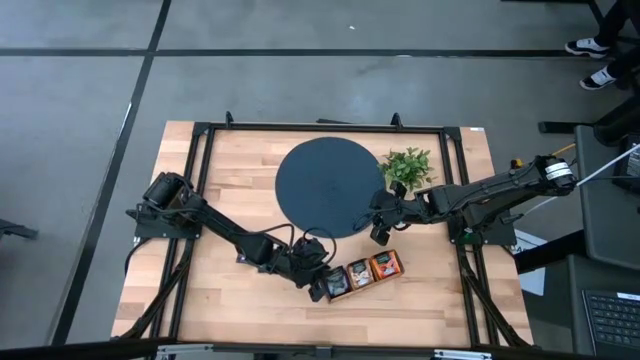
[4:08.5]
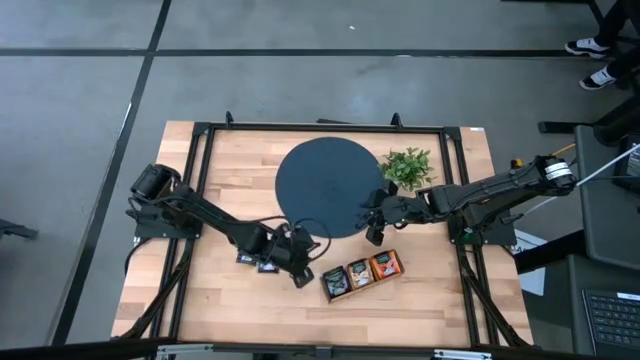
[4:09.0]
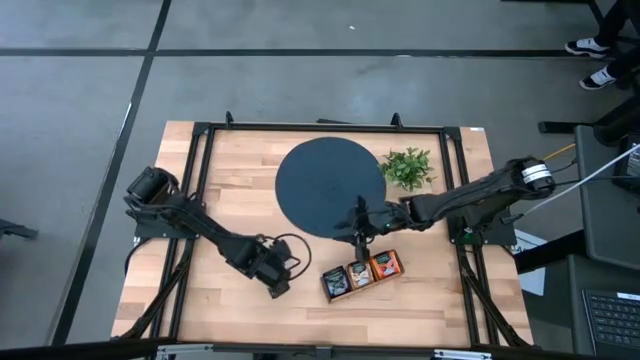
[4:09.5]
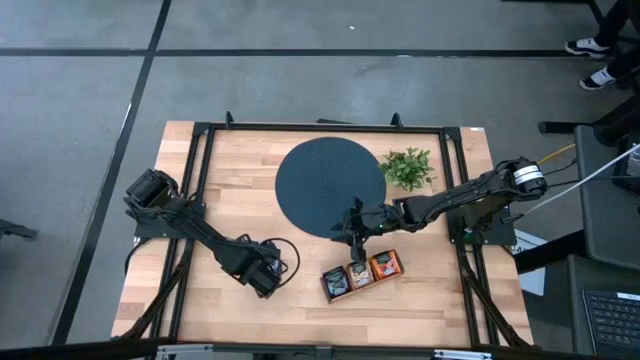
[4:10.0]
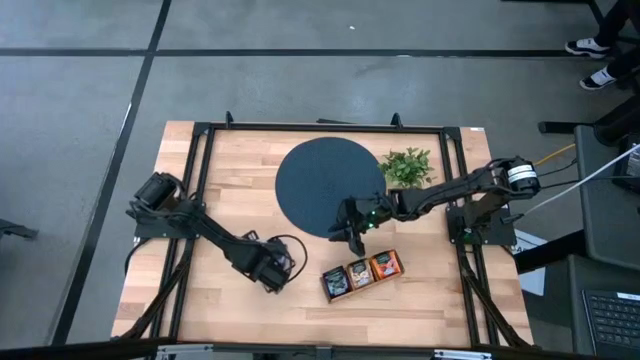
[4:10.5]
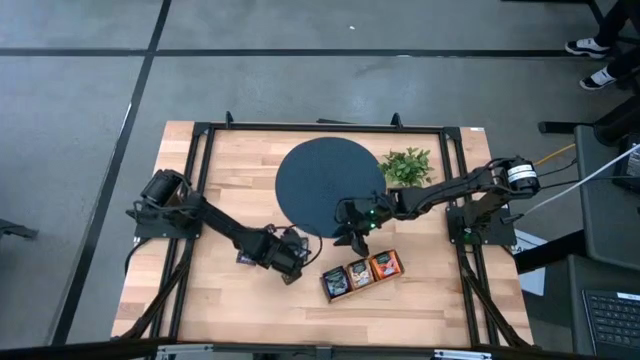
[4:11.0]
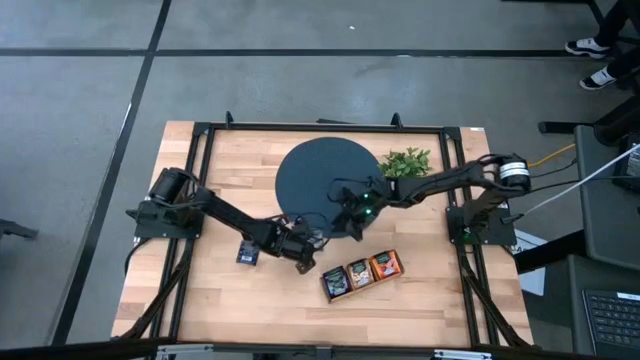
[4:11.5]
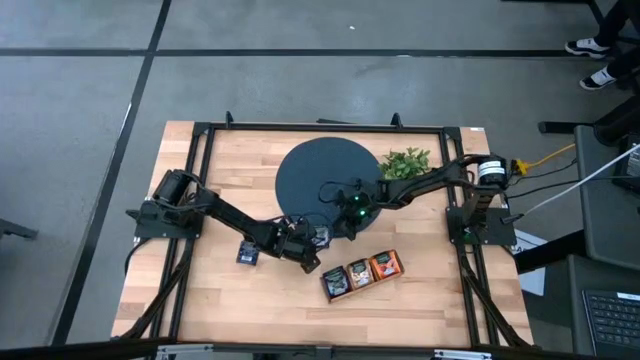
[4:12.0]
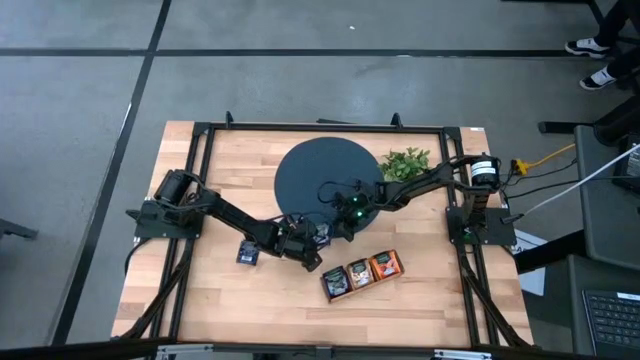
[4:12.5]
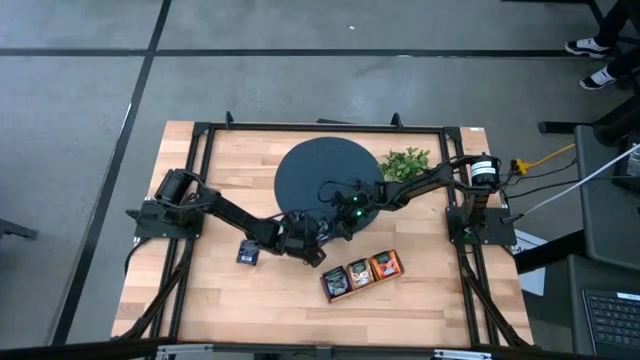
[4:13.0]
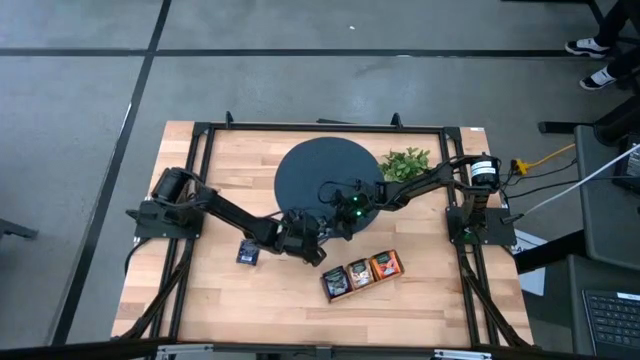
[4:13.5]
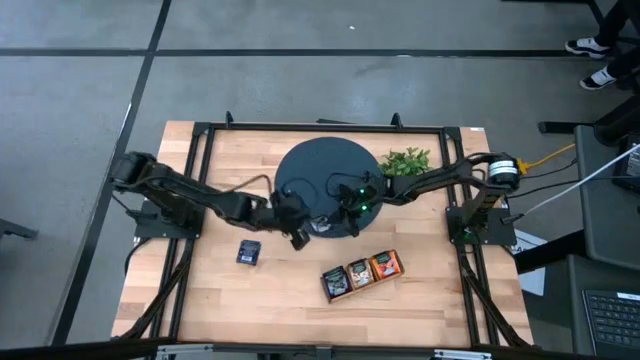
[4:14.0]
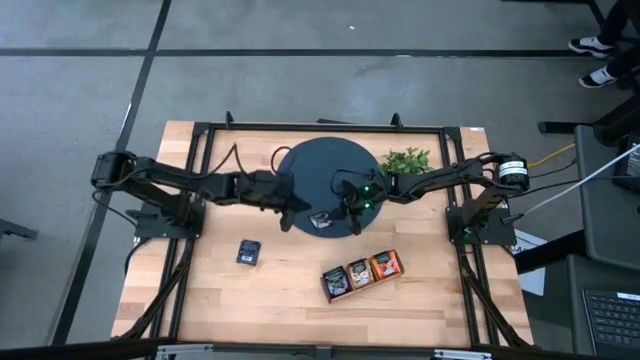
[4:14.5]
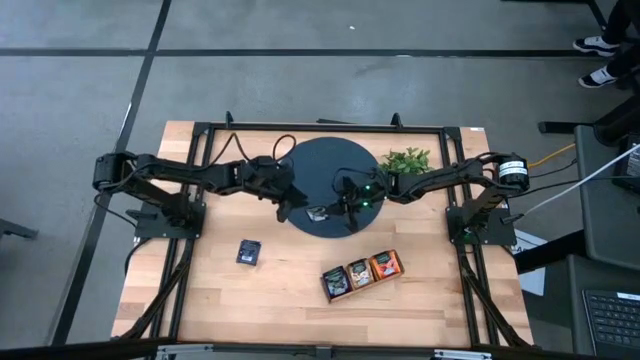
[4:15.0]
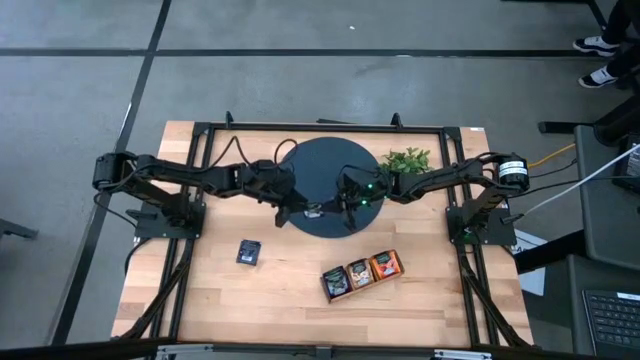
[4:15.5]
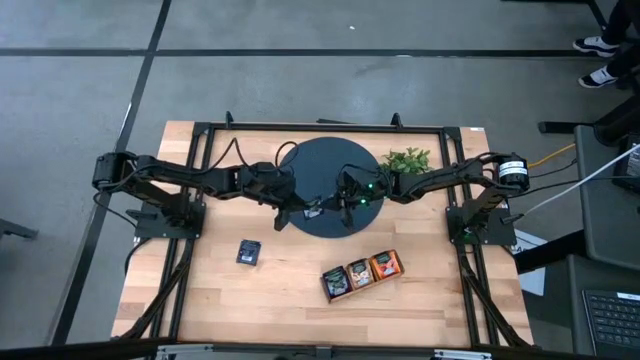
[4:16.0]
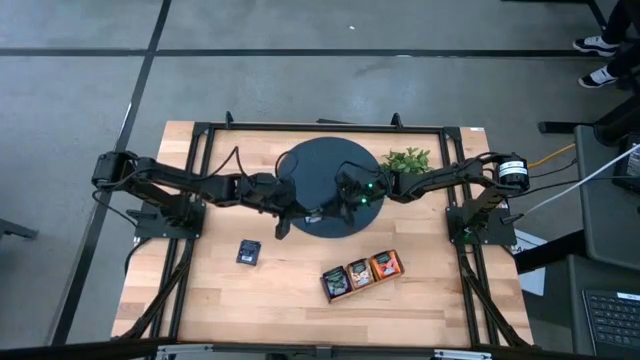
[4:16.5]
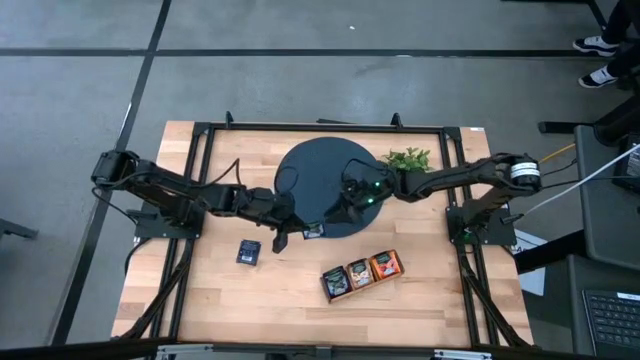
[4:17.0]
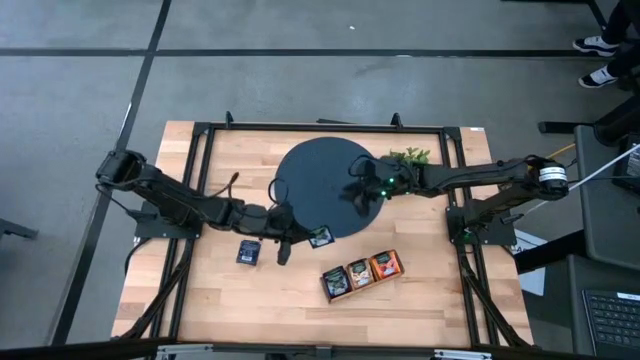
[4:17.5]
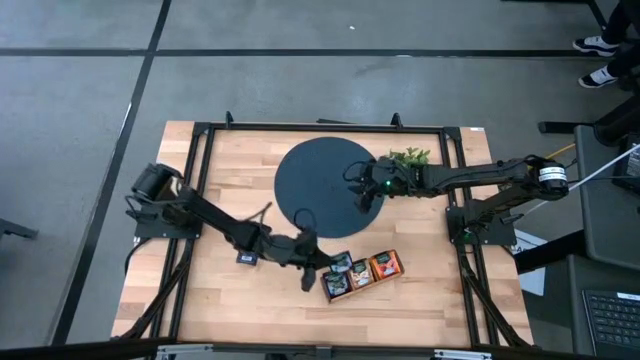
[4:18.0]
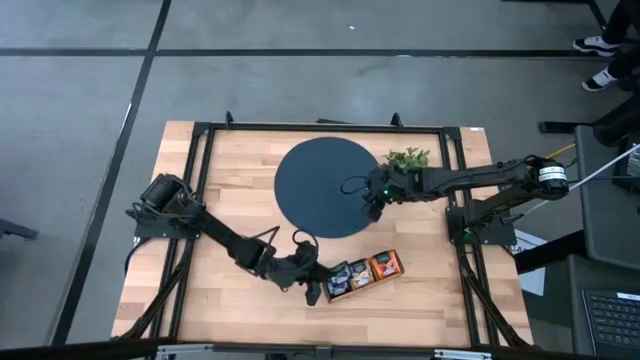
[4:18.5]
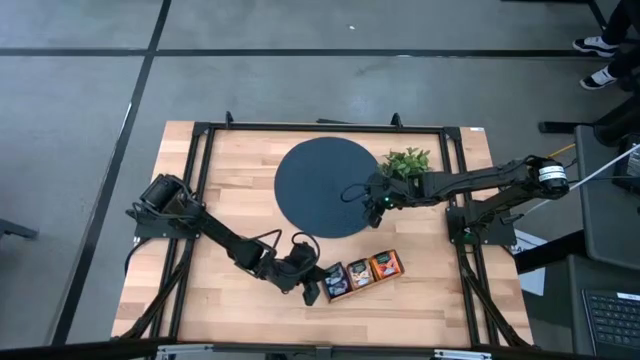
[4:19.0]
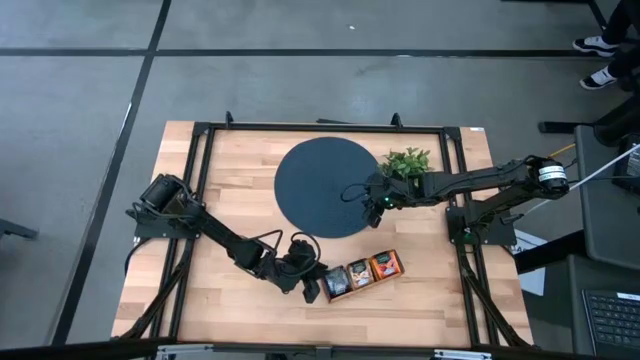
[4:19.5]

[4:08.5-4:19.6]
Task: Pick & Place Tea
Put the purple tea bag into the left section of the wooden organizer

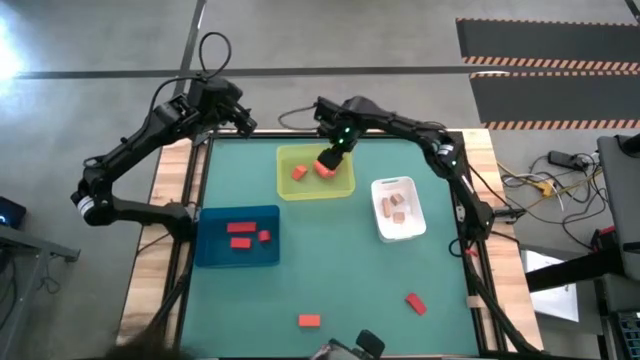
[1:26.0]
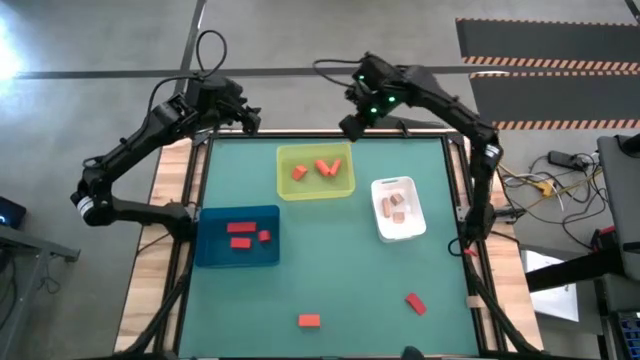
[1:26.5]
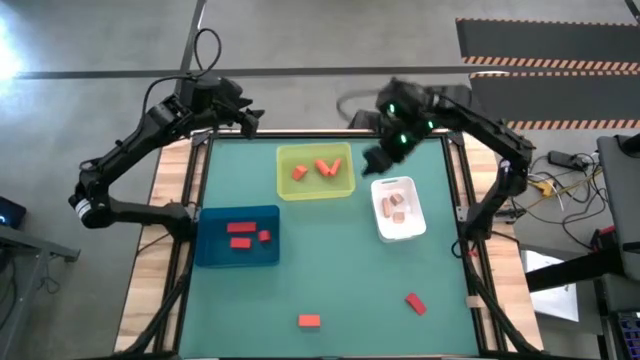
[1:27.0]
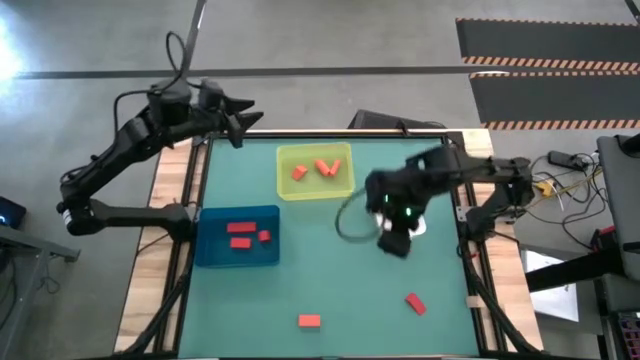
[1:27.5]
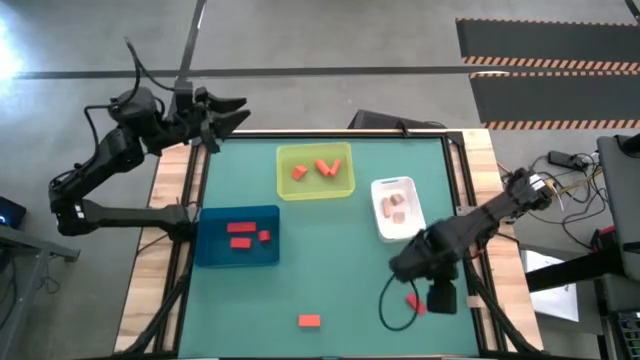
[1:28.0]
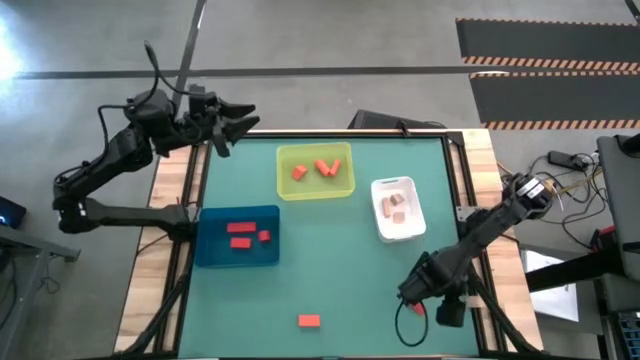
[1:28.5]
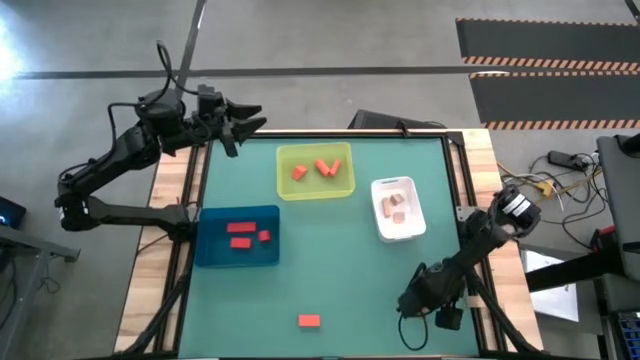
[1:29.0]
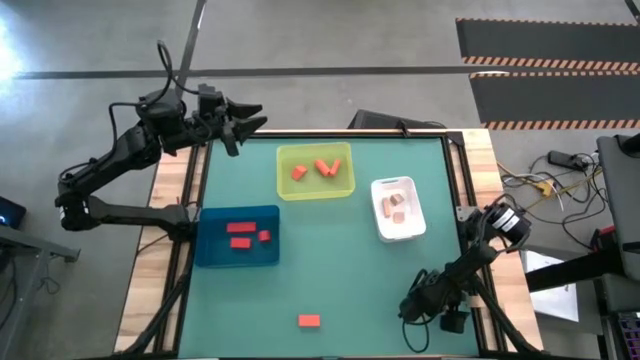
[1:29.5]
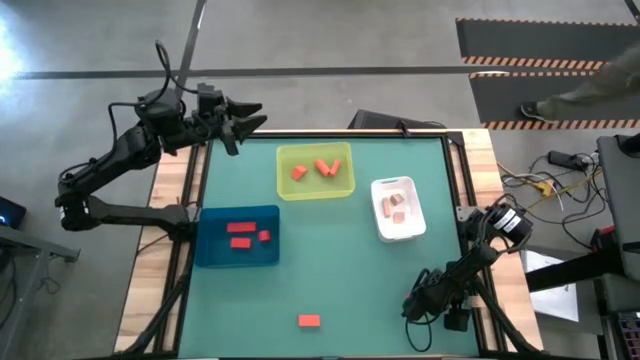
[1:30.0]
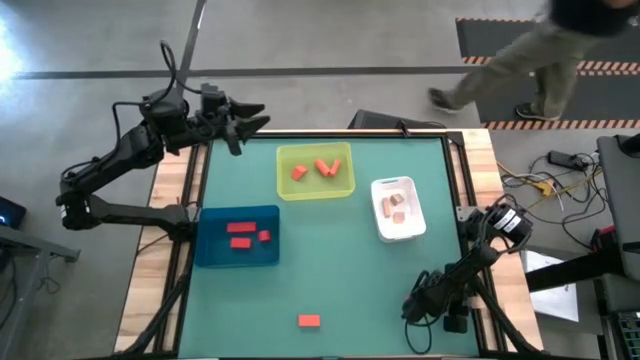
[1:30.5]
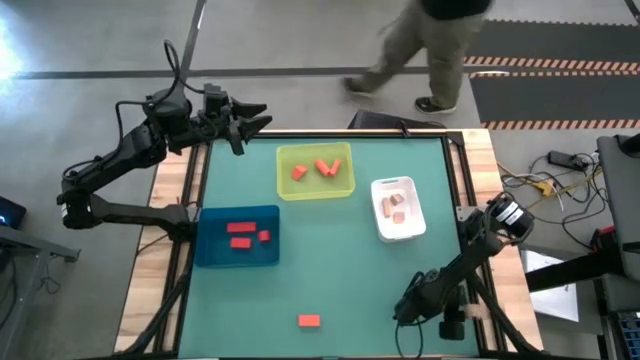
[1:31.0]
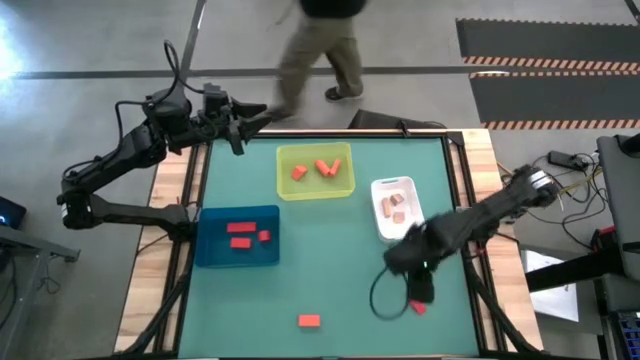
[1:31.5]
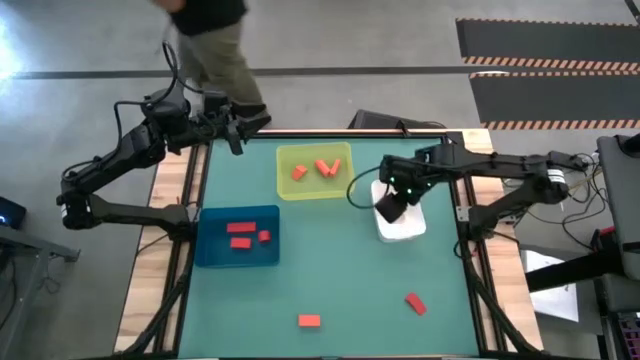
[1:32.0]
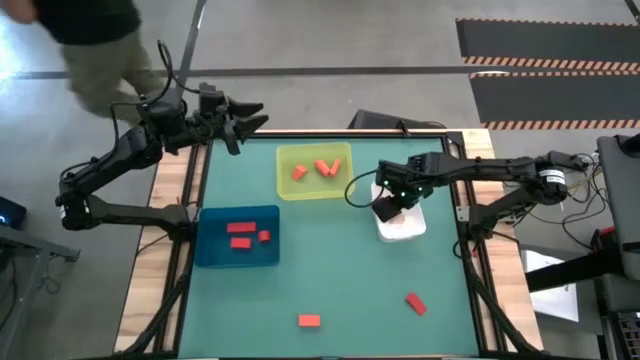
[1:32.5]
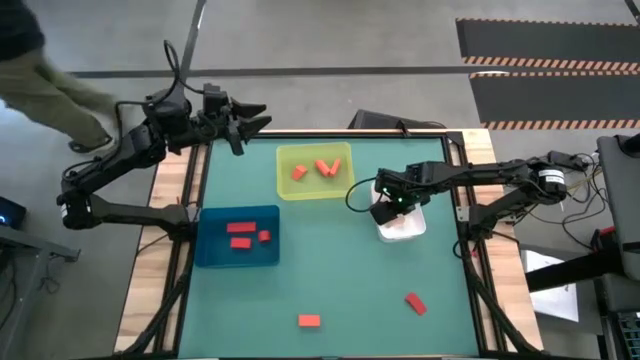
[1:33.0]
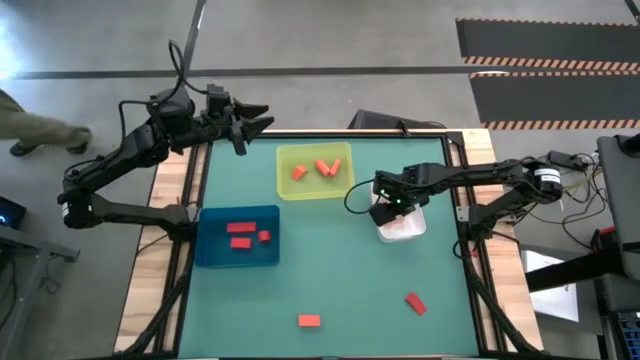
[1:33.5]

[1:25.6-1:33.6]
Task: Sort & place blocks by color
Put the brown block into the white bin
